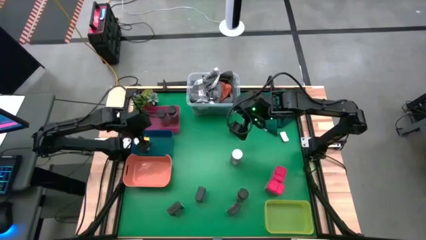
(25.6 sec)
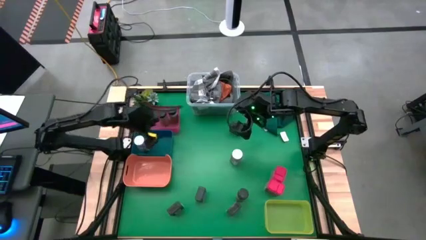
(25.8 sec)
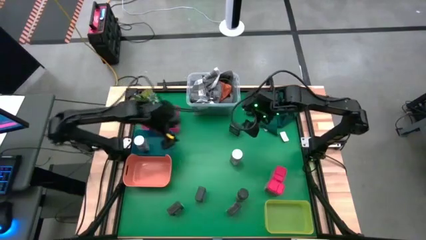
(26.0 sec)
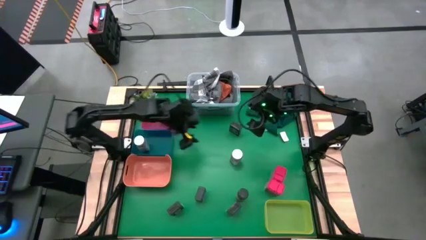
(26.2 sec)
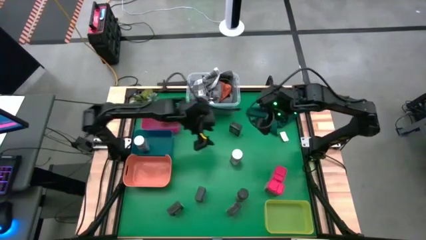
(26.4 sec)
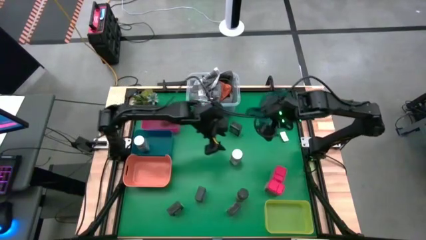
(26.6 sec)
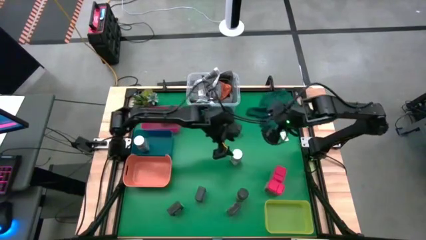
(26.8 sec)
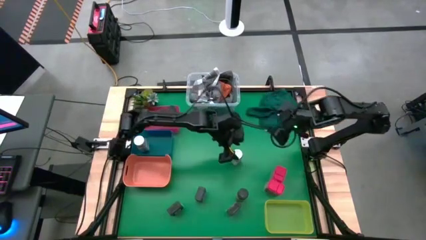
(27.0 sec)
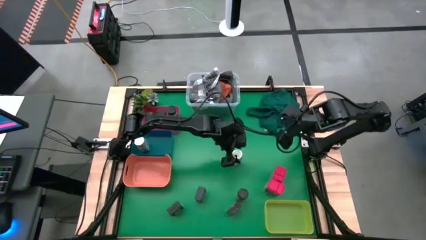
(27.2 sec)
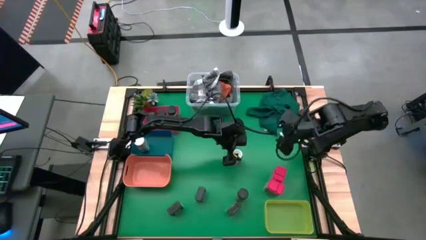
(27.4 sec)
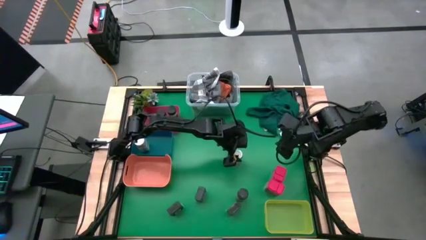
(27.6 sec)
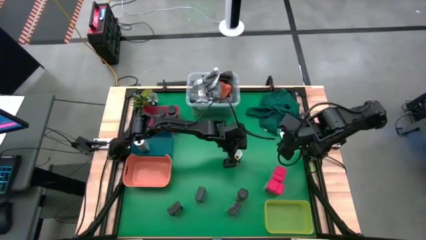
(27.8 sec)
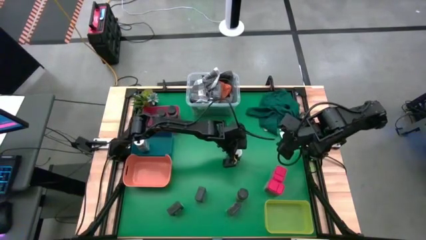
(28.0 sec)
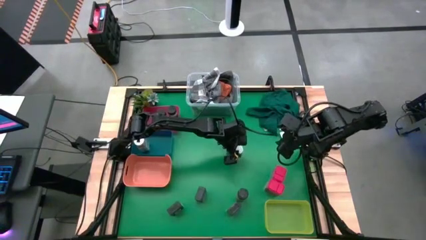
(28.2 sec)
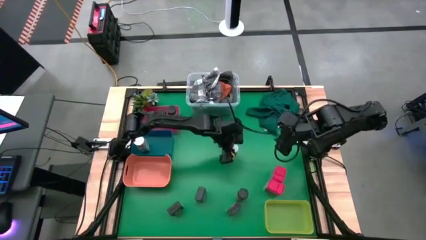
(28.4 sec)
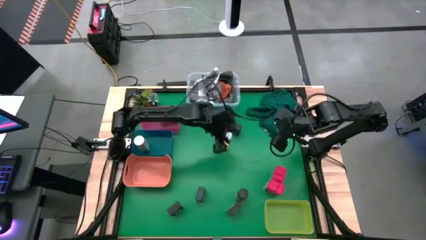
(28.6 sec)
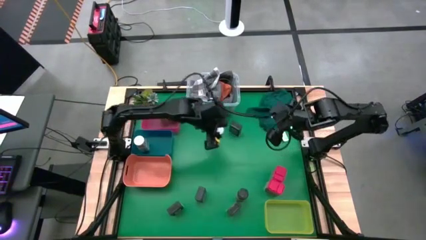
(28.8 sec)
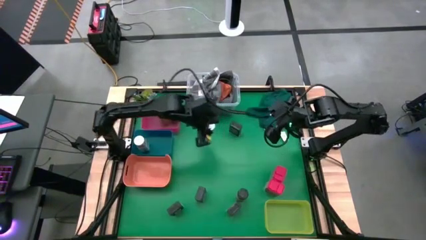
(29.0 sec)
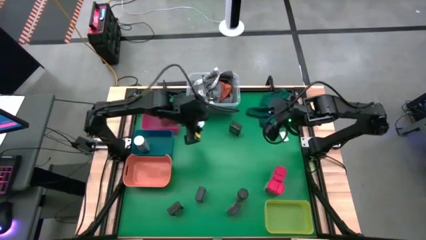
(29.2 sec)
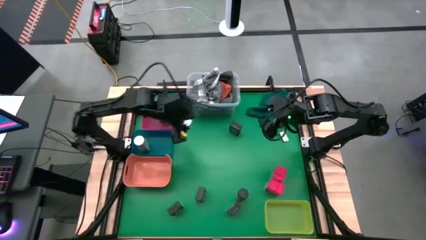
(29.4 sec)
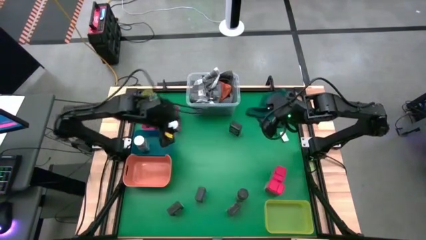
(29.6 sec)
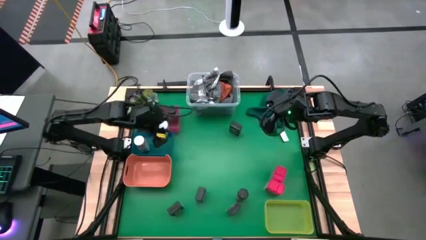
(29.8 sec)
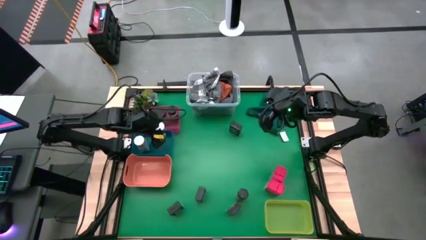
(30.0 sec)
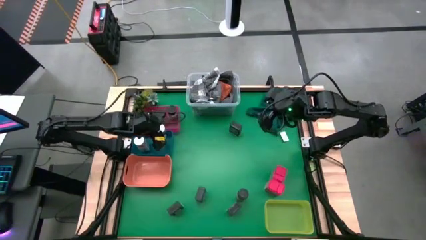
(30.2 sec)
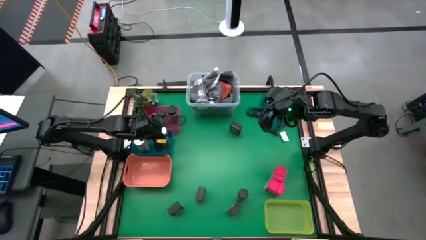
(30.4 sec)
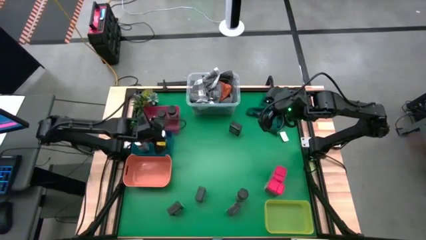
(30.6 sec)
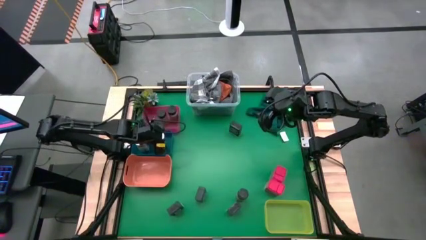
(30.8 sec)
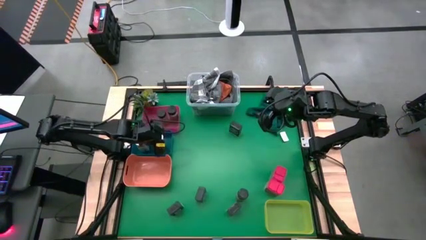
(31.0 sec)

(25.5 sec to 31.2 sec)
Task: Sort spices by type
Put the white spice bottle into the blue bin

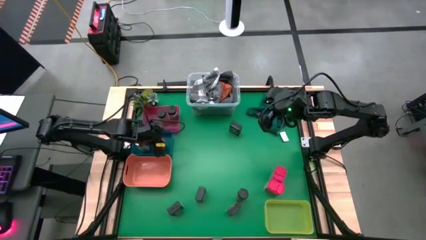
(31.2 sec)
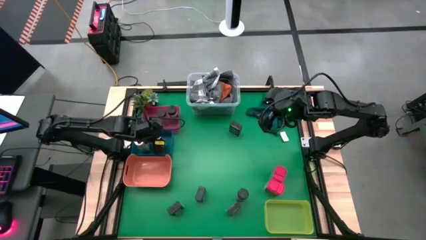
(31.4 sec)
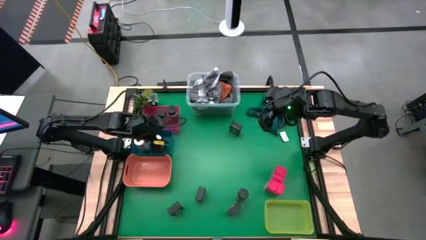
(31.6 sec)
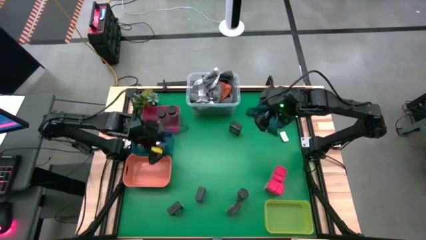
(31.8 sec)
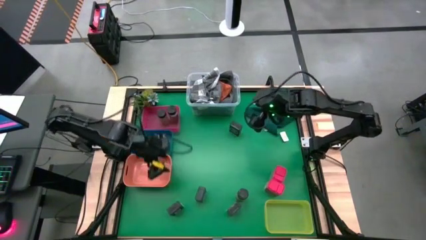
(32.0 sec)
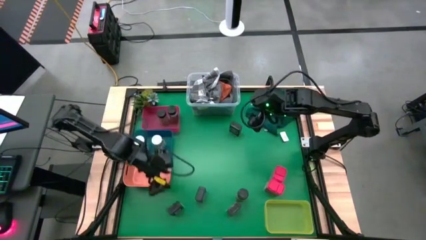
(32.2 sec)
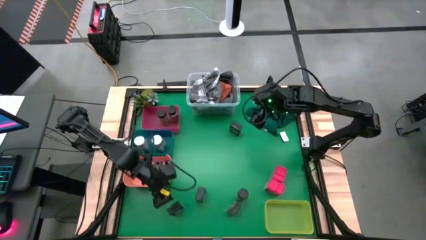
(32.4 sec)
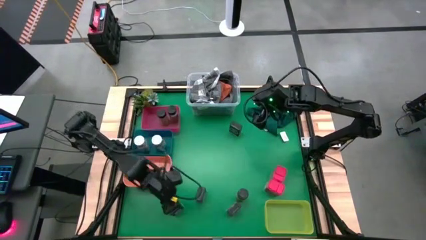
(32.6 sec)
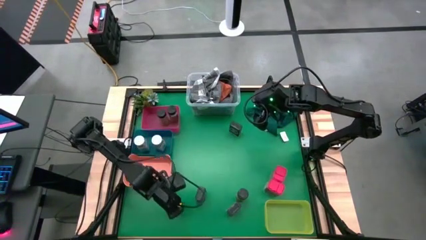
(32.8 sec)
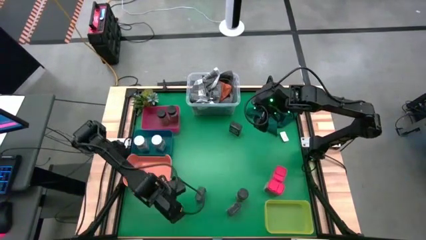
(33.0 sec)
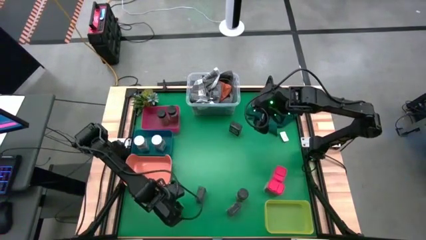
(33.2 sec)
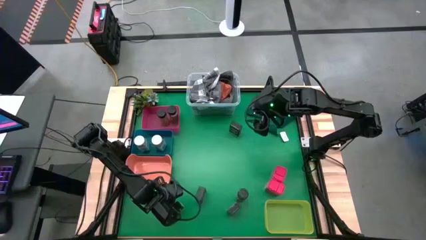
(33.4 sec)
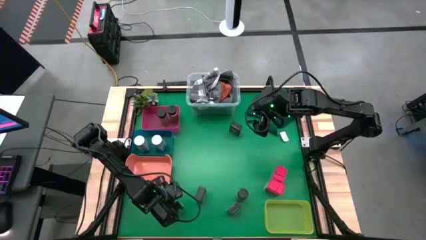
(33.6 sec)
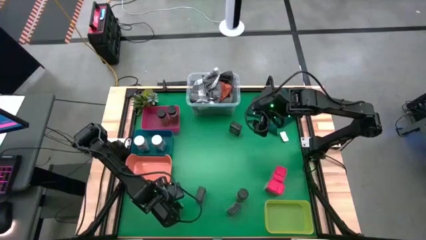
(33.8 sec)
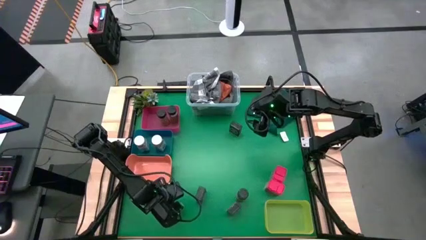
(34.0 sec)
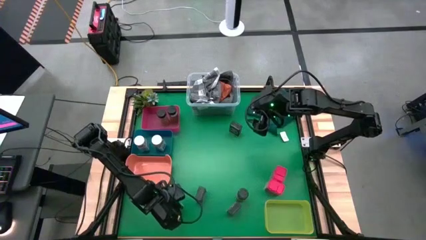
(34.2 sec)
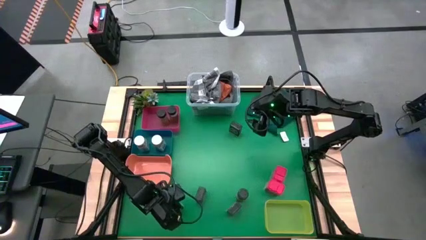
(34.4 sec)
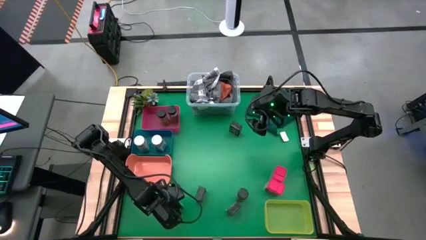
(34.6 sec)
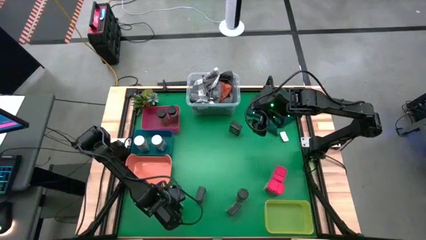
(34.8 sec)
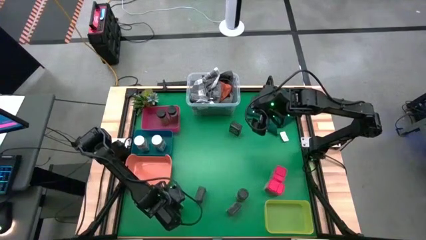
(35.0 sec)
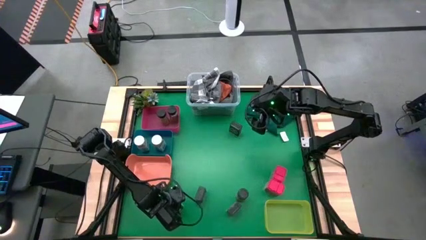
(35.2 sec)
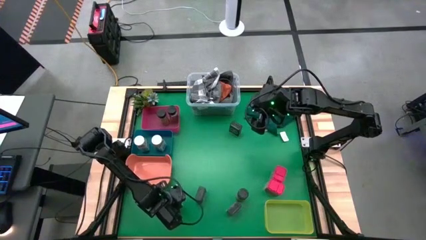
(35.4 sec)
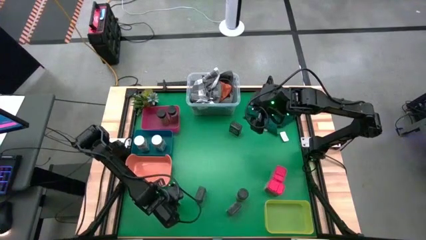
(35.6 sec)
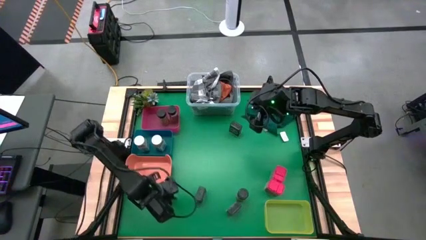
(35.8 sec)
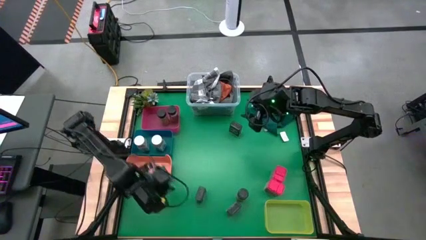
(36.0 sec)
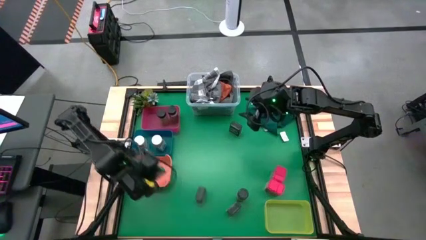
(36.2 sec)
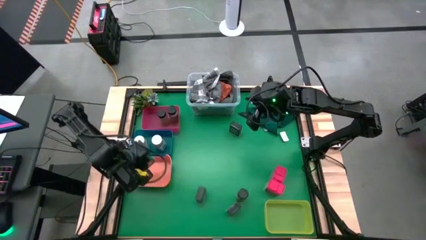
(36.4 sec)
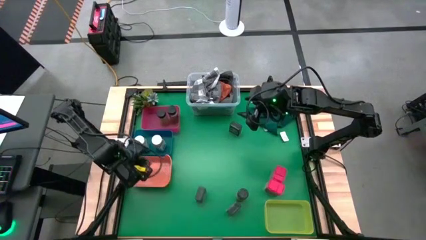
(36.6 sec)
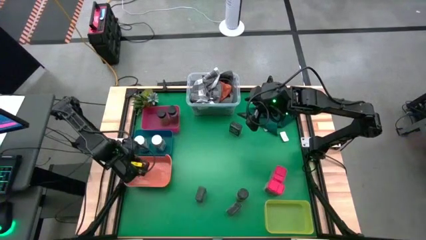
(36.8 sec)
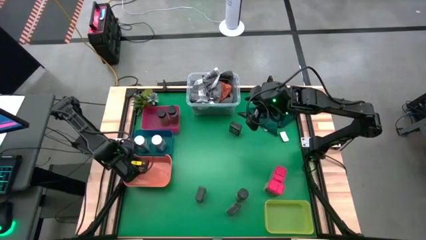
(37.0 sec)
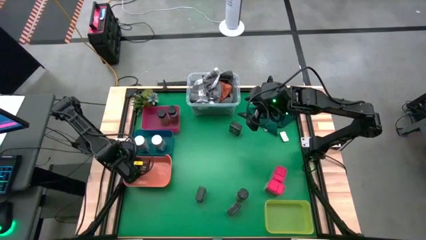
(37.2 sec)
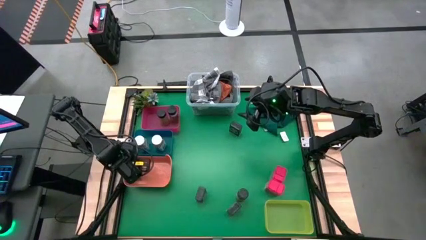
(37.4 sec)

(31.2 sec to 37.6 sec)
Put the bottom left black spice can into the orange bin

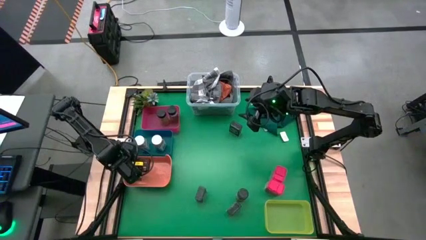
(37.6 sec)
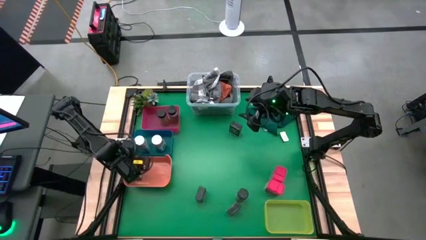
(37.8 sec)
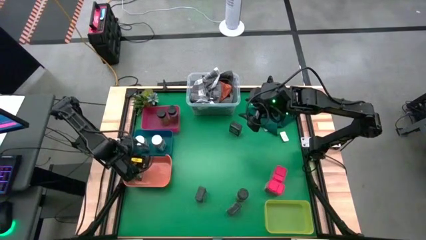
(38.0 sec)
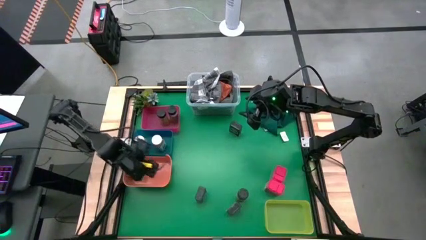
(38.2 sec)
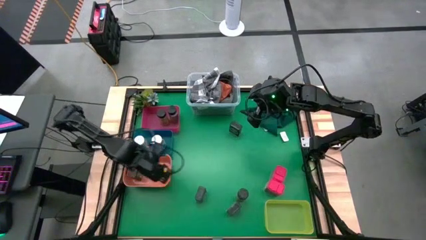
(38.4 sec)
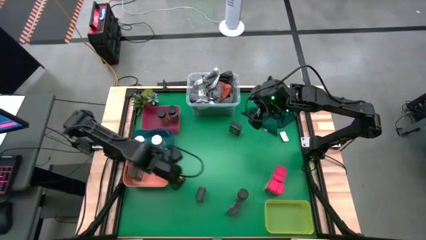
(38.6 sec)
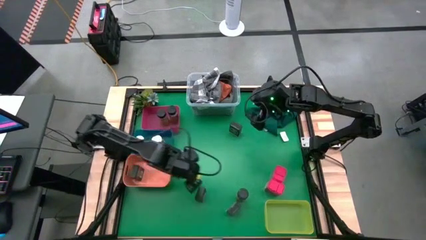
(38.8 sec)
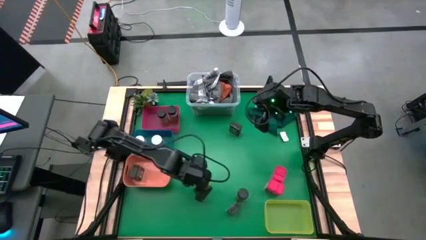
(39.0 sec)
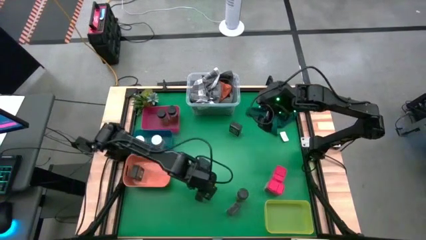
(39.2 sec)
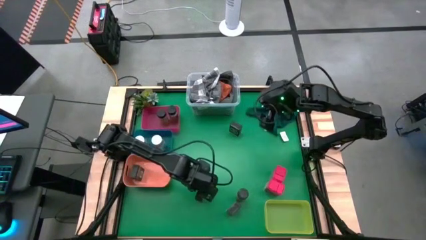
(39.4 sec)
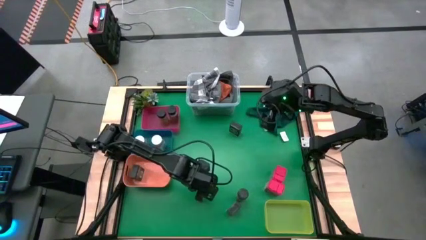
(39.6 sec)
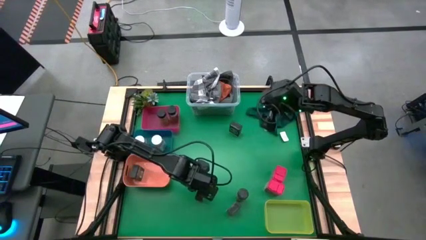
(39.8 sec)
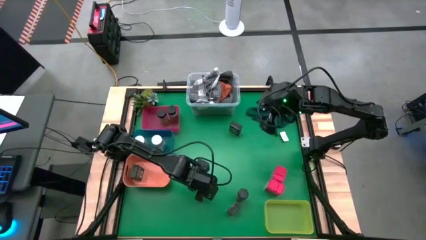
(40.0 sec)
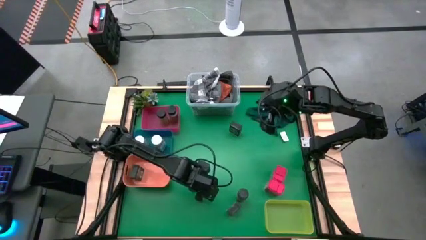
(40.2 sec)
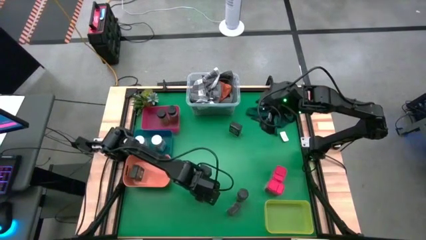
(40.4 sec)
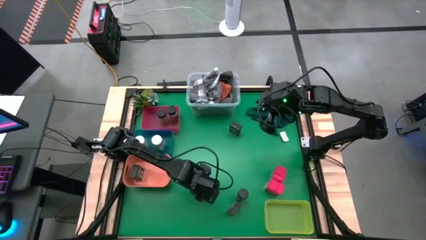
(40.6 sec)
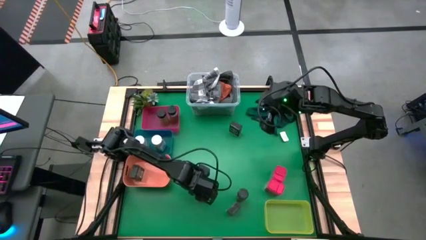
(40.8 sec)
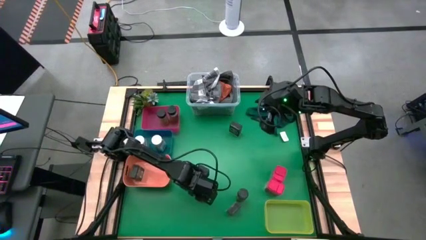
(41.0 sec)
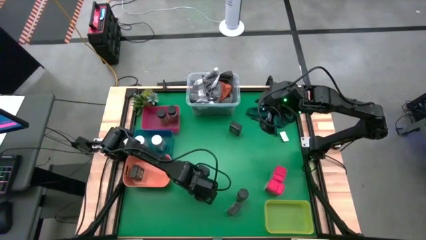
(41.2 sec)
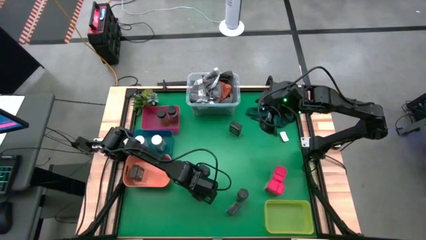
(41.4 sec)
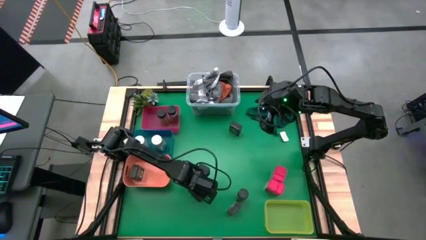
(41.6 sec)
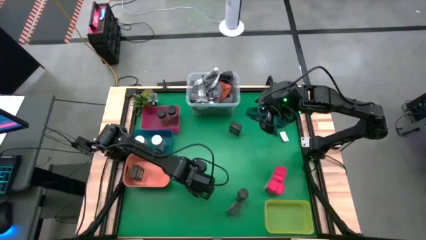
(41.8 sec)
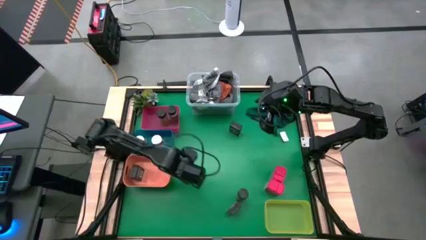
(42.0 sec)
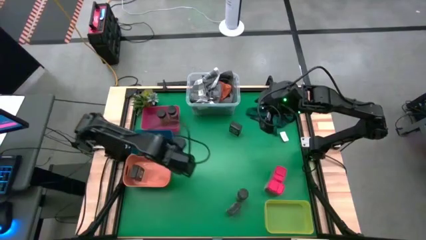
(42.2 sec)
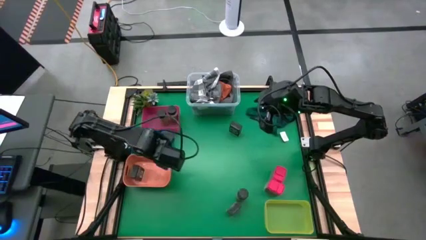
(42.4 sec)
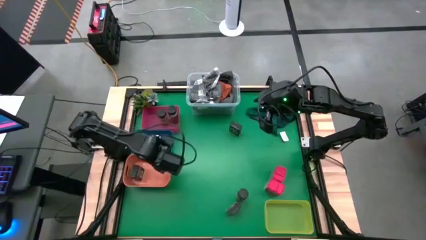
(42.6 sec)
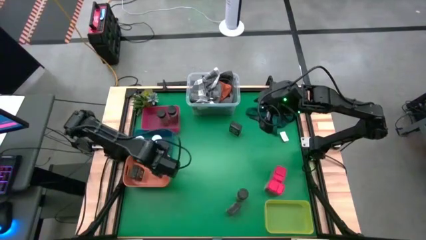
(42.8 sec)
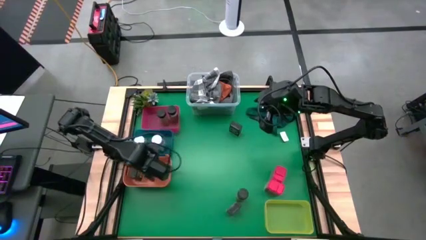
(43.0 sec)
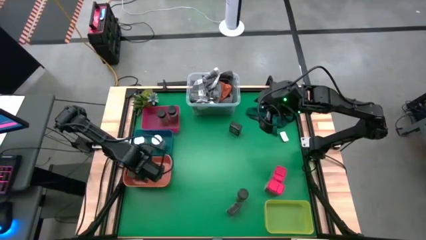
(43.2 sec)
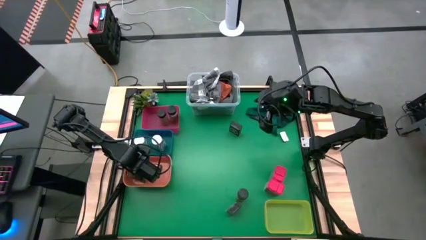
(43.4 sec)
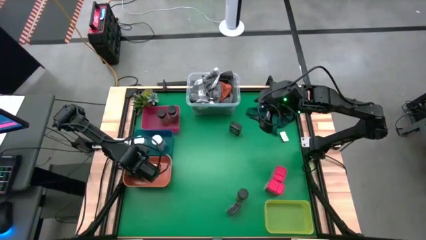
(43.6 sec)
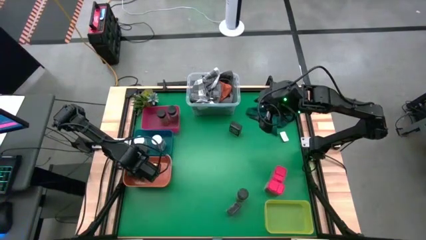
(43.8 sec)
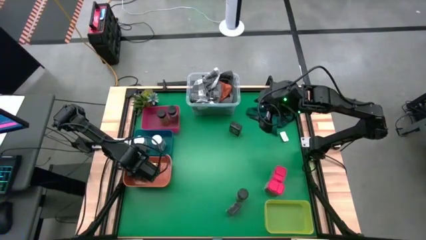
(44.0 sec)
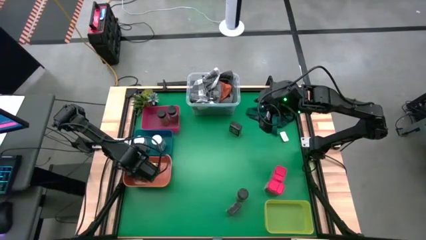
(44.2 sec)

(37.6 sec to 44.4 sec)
Put the bottom left black spice can into the orange bin
